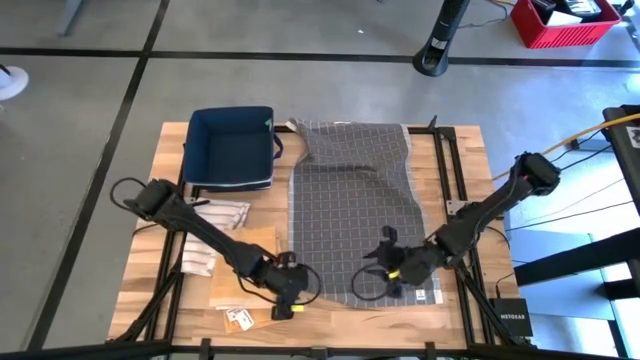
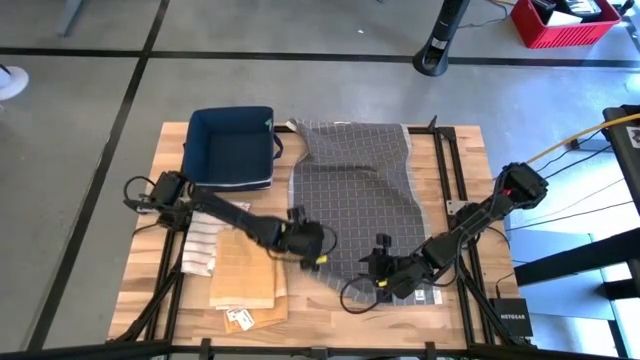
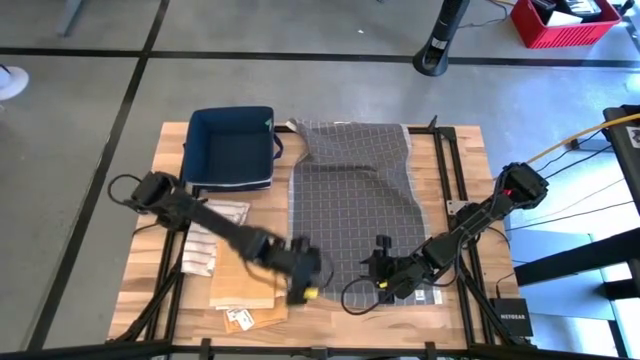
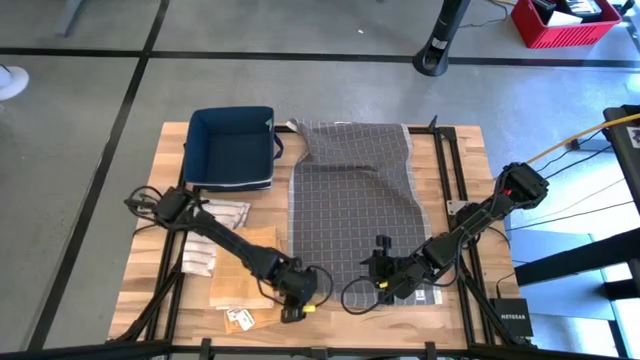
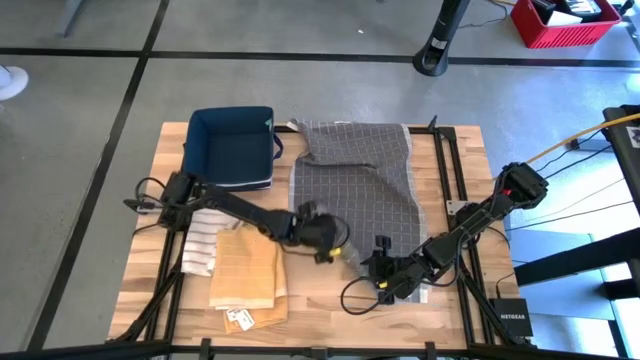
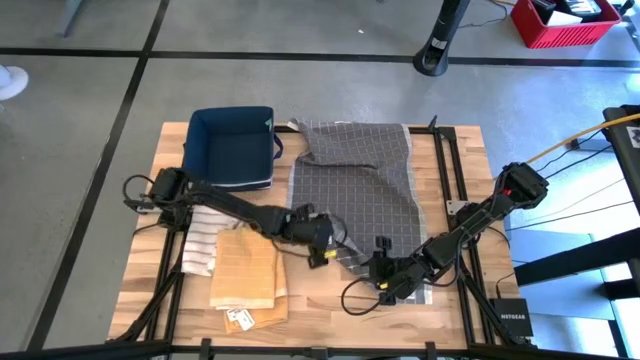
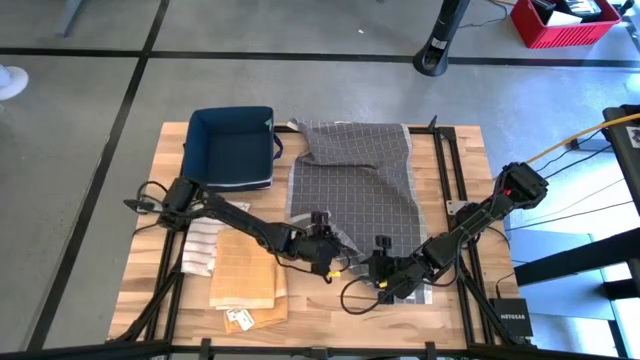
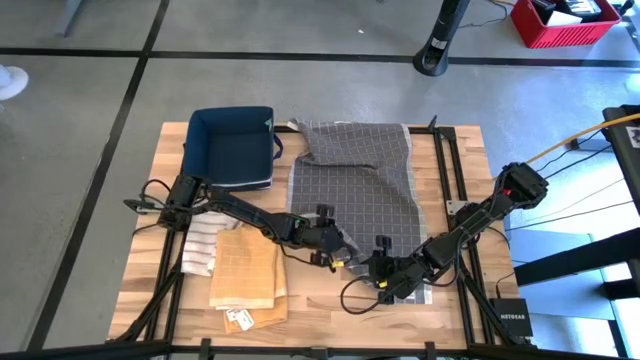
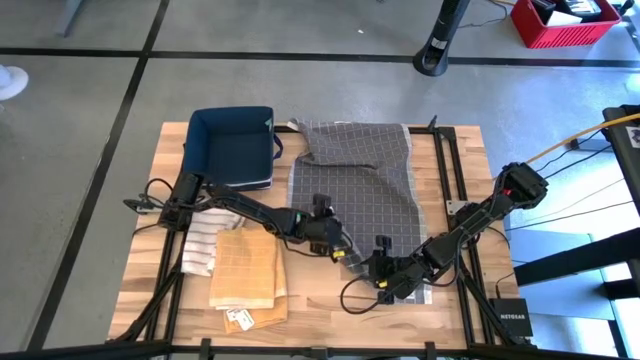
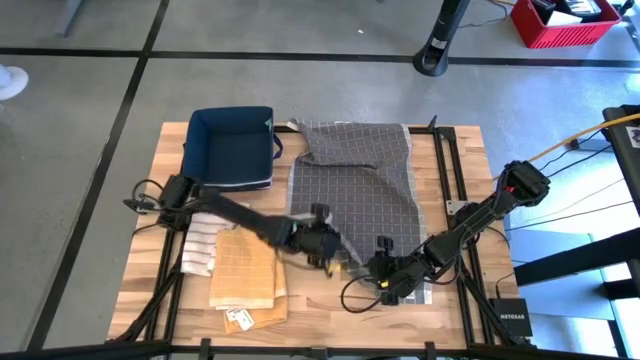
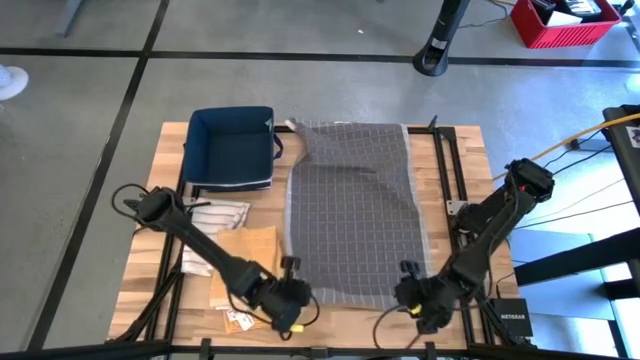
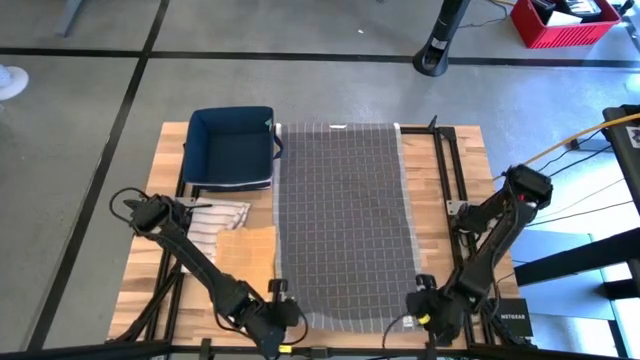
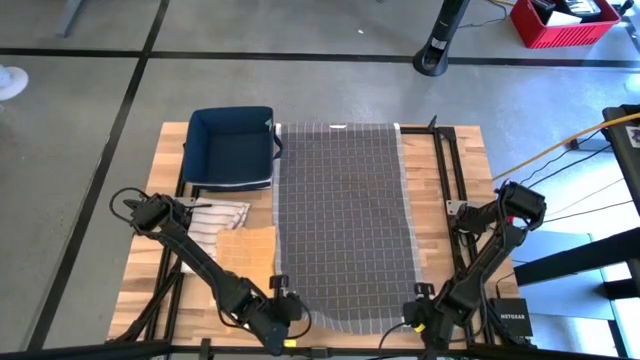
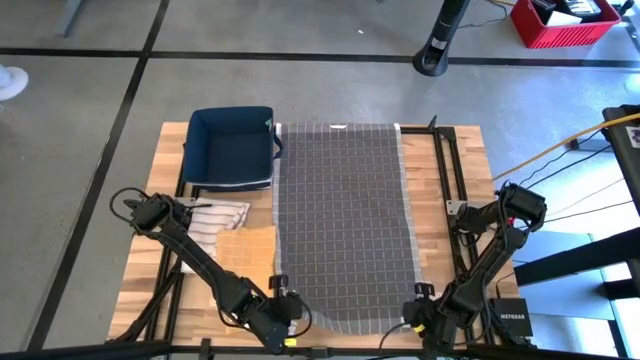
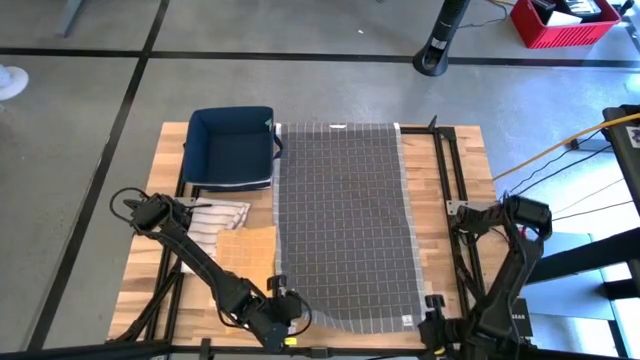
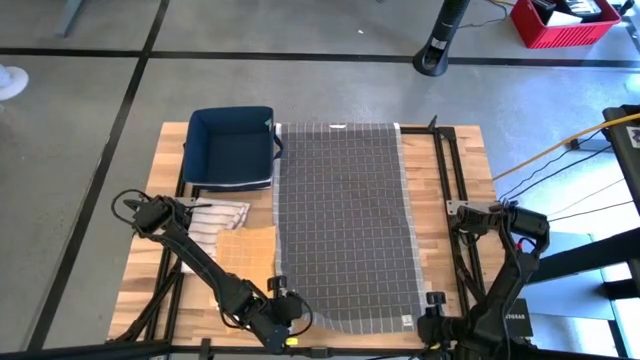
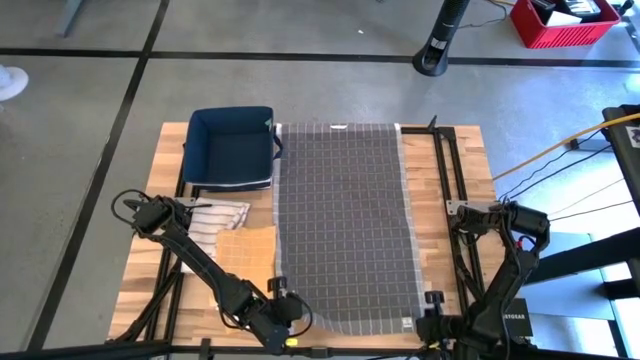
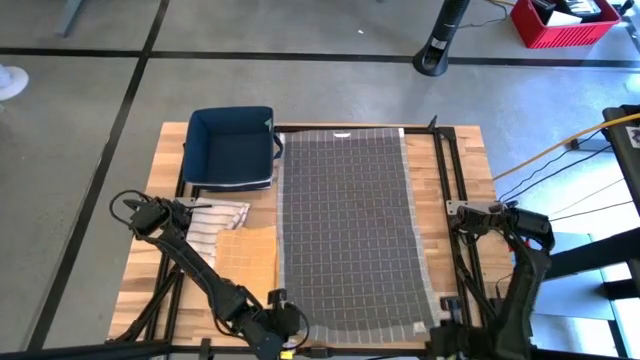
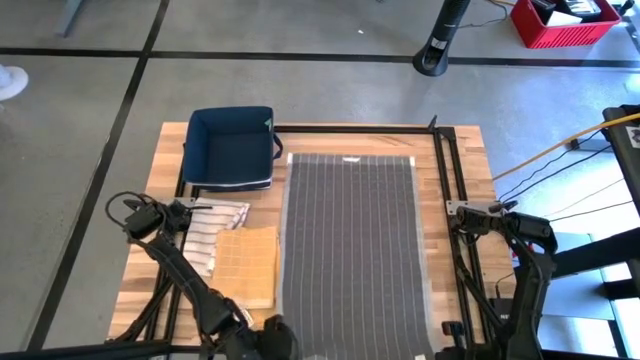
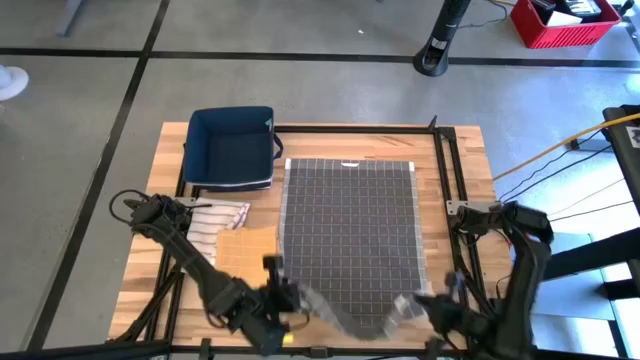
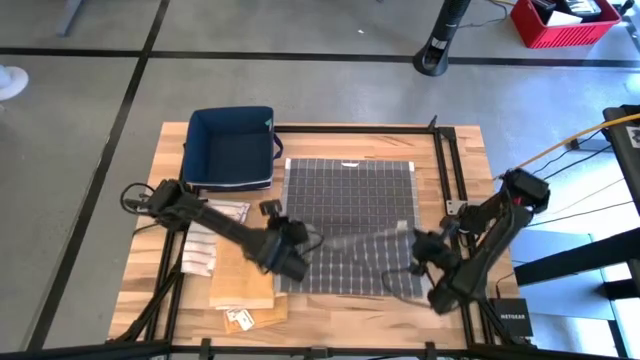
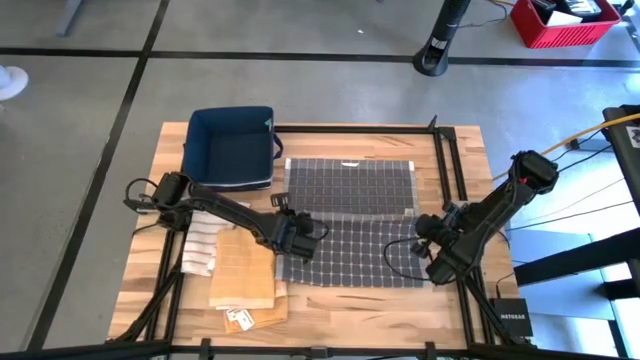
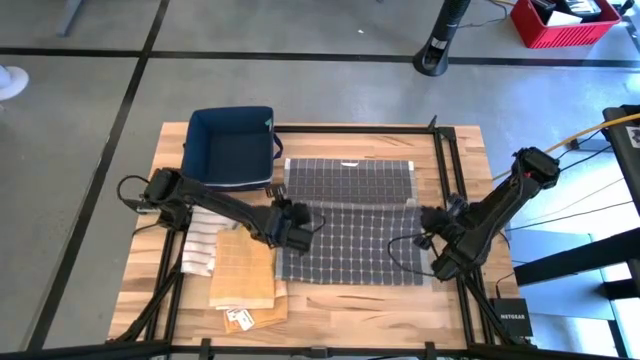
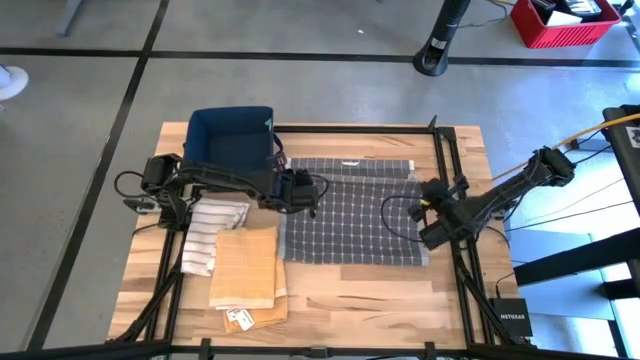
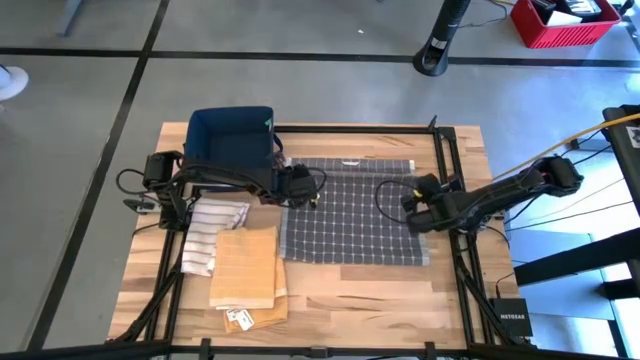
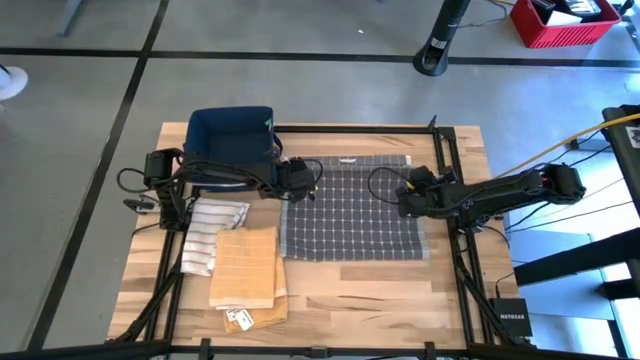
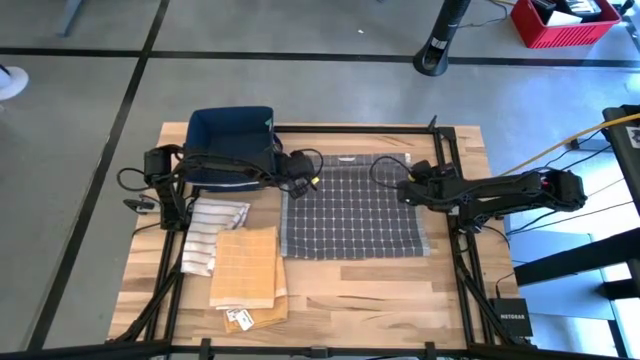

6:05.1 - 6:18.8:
Task: Fold towel
Fold the gray pattern towel

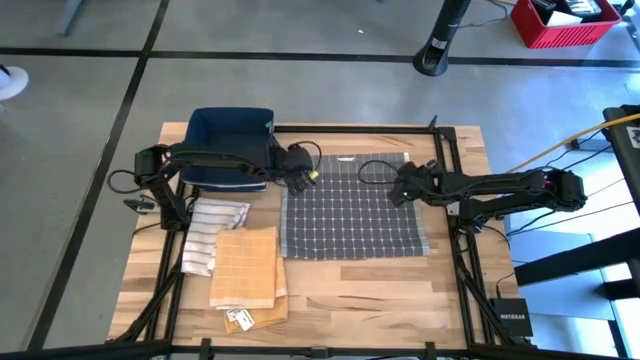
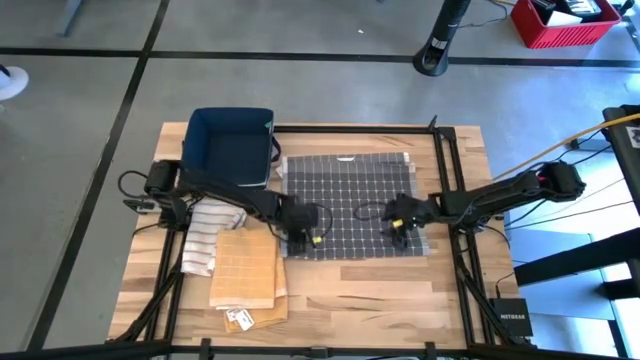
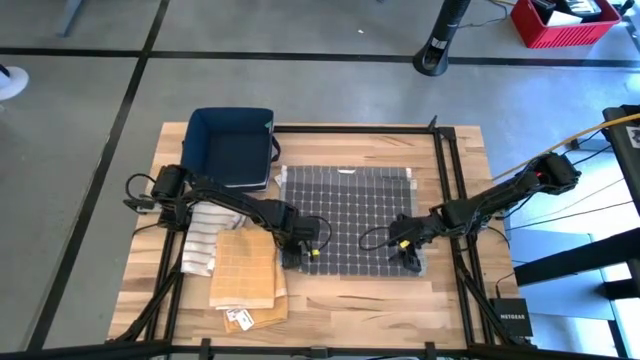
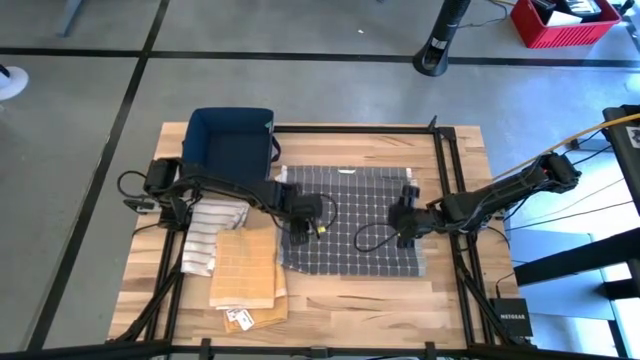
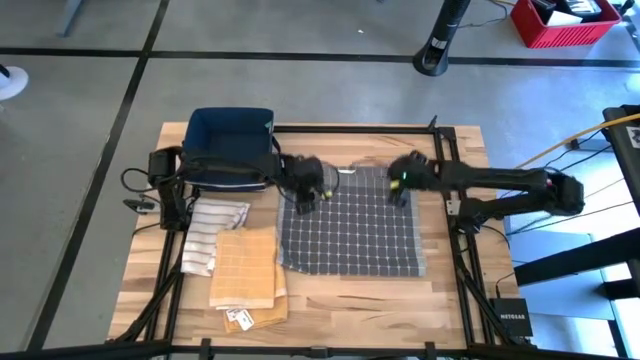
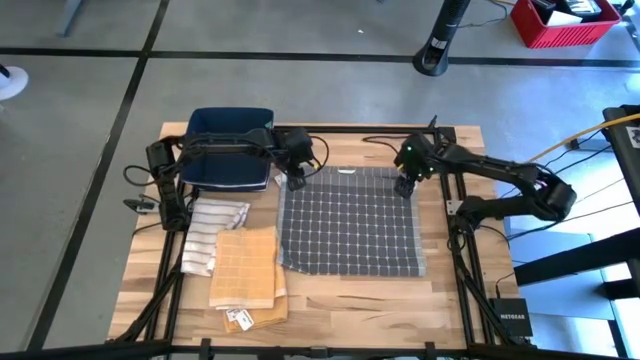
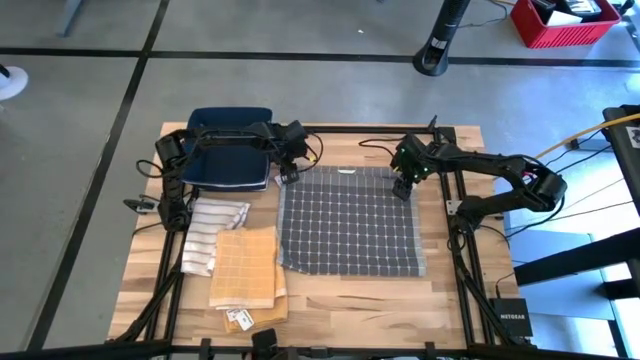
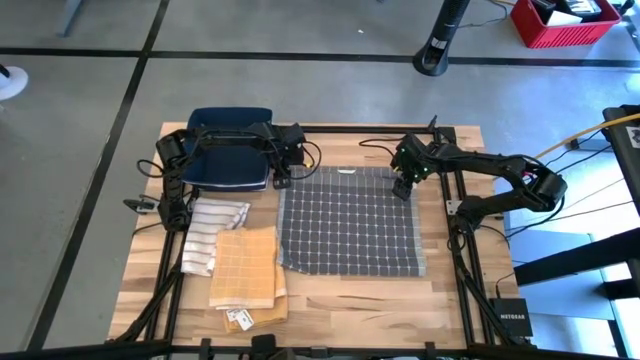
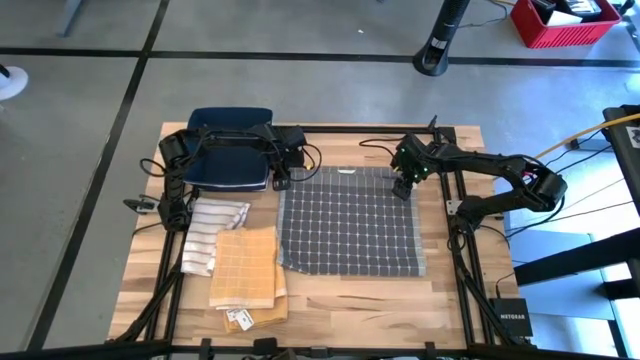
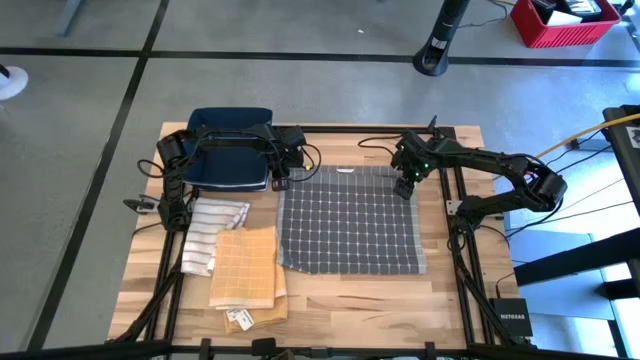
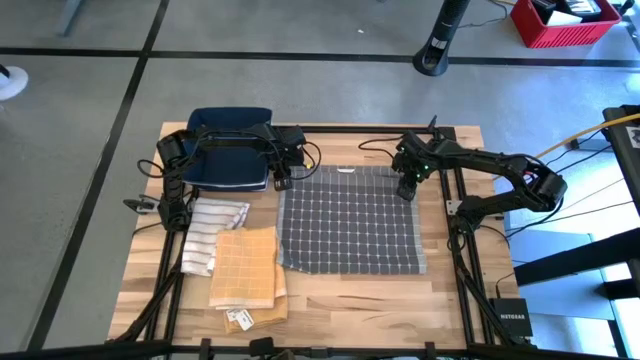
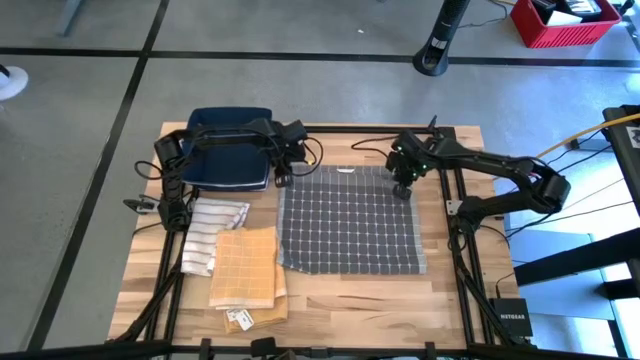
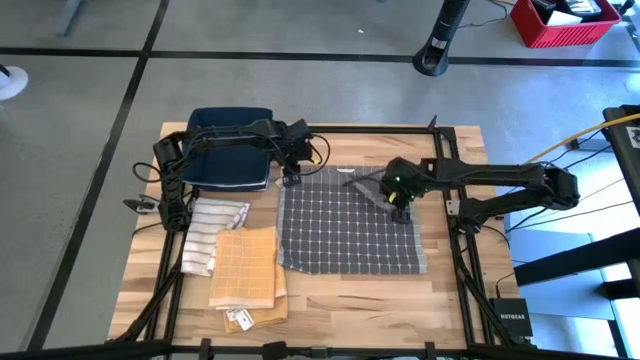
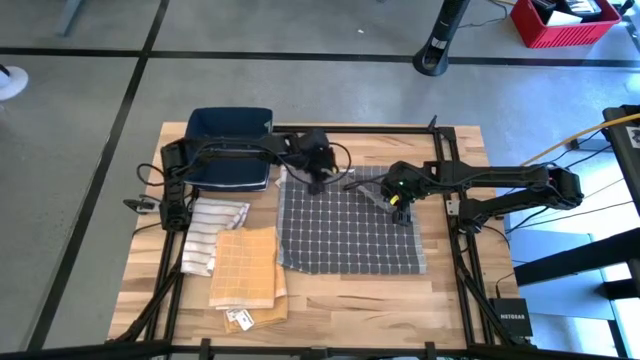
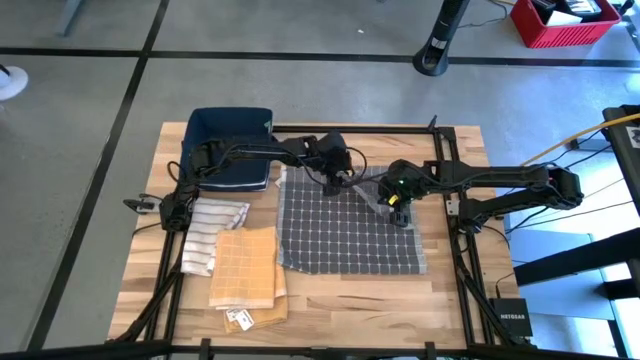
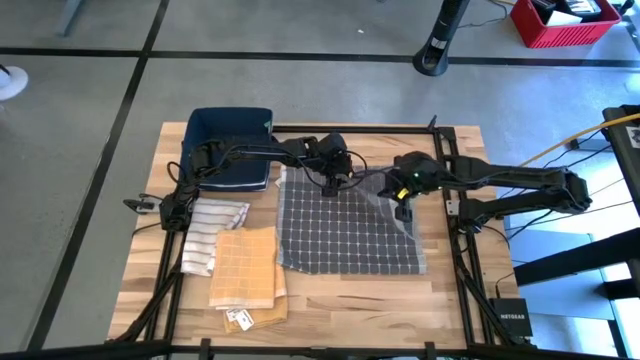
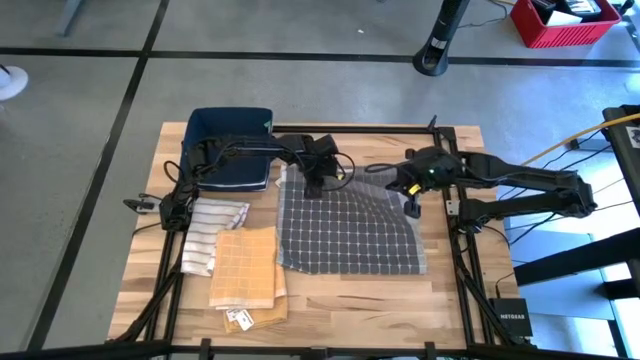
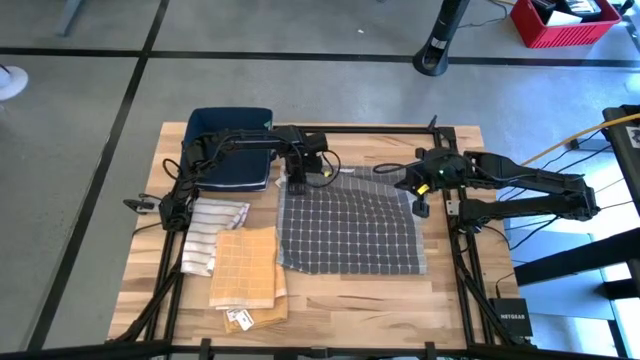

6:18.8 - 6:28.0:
Fold the gray pattern towel
